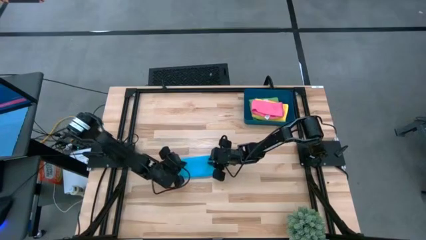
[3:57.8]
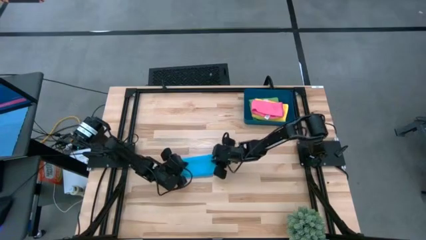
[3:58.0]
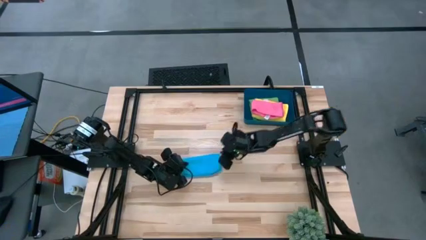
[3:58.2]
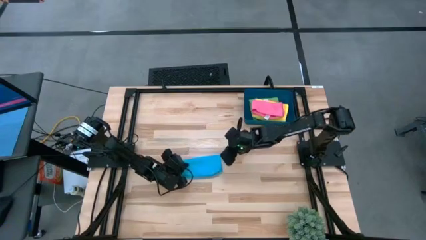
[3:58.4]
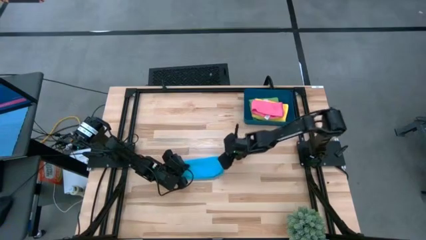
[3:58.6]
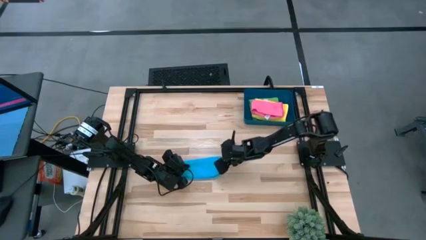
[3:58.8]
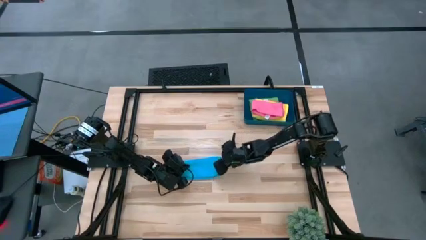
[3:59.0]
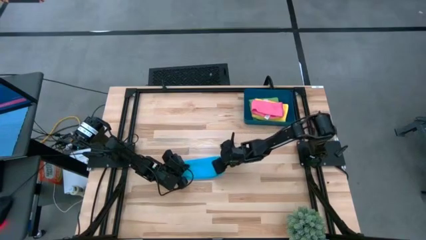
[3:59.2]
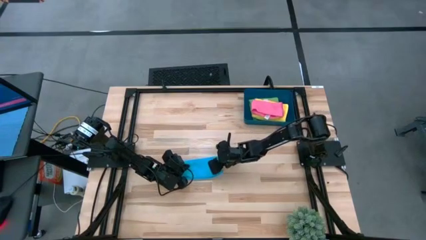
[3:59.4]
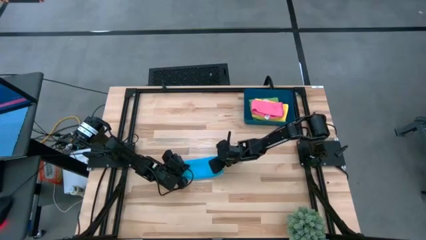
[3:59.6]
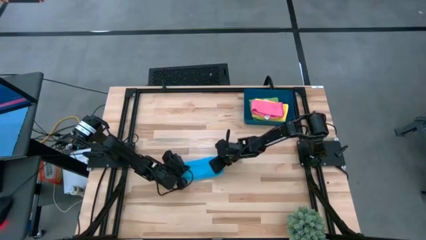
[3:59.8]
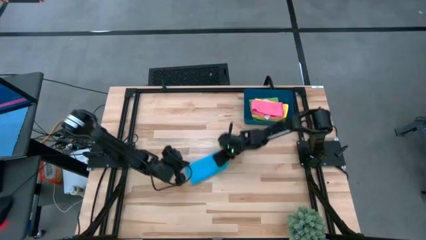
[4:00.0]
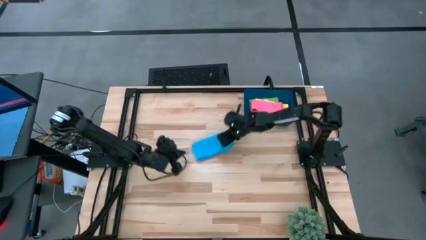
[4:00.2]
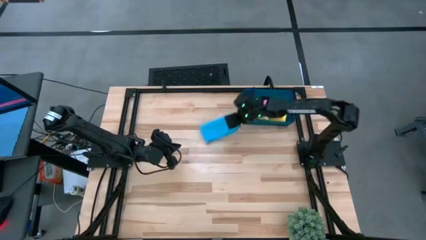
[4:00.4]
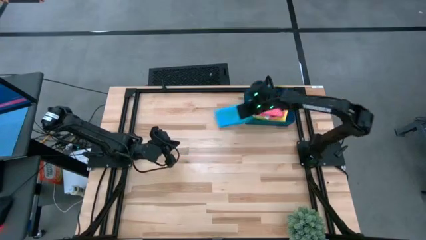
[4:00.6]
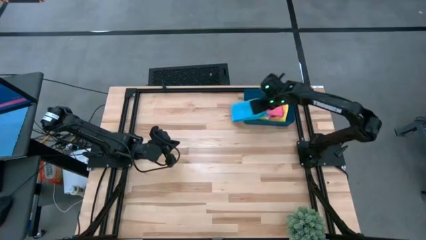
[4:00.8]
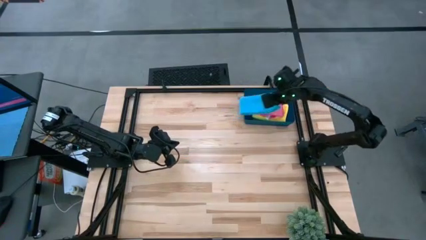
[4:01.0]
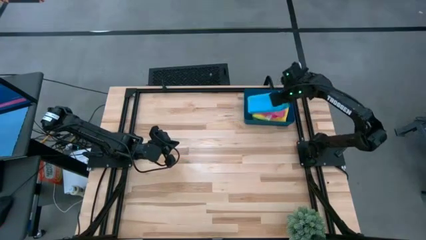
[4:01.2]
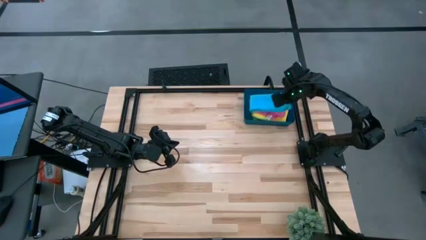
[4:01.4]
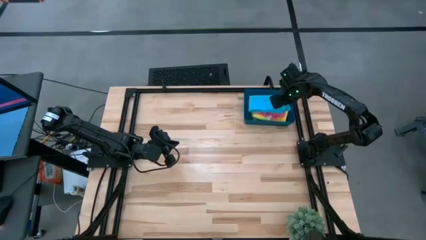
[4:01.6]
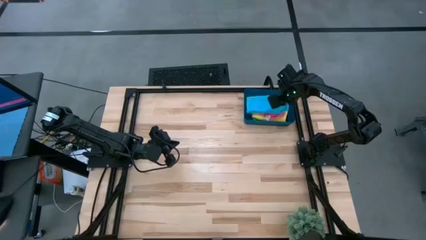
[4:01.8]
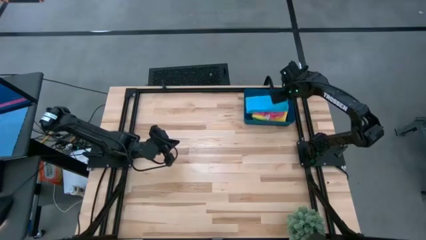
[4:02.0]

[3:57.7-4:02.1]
Task: Fold microfiber towels
Put the light blue microfiber towel into the bin

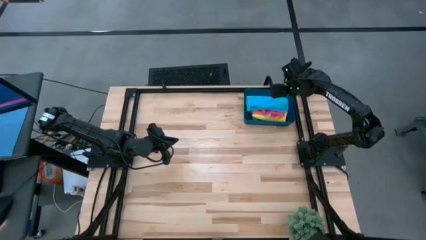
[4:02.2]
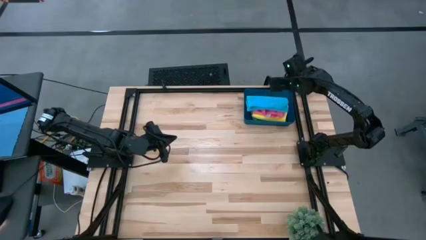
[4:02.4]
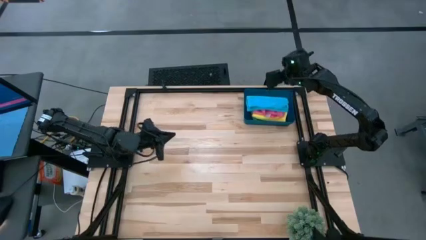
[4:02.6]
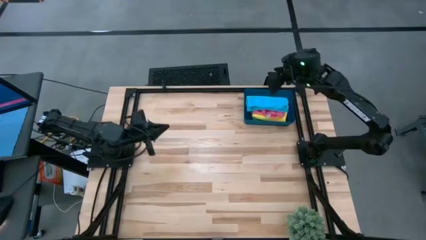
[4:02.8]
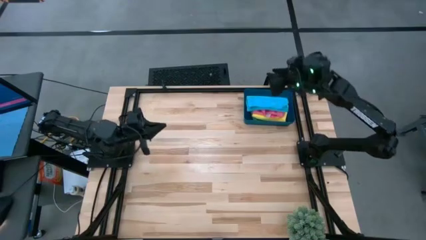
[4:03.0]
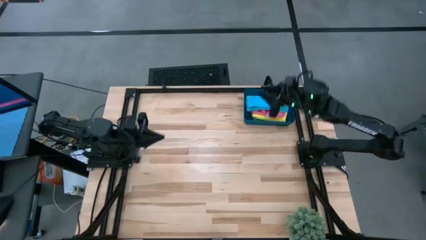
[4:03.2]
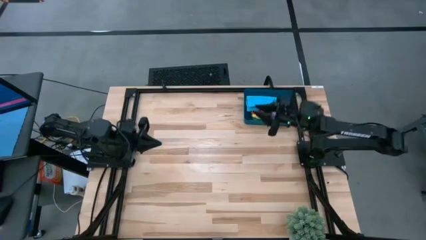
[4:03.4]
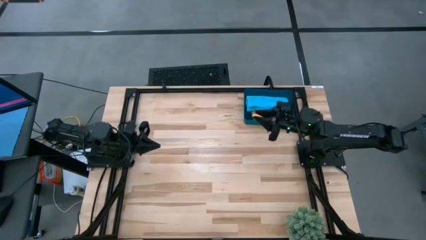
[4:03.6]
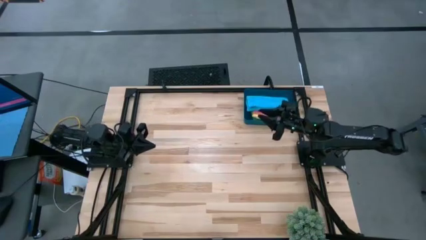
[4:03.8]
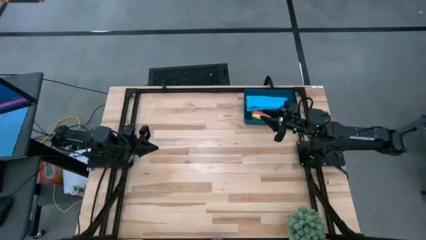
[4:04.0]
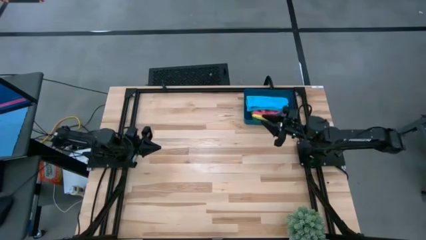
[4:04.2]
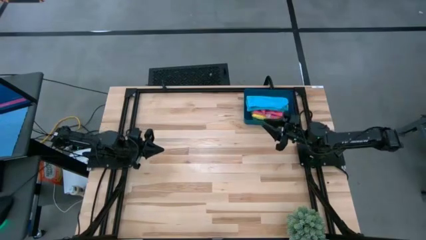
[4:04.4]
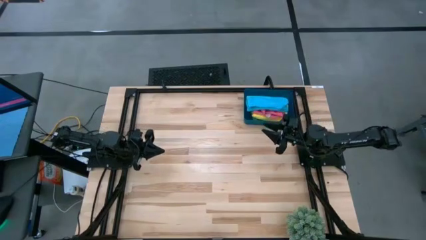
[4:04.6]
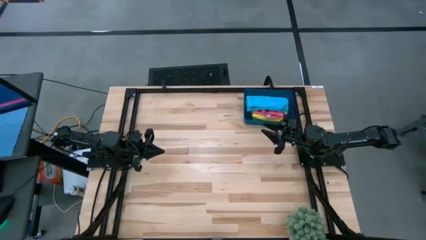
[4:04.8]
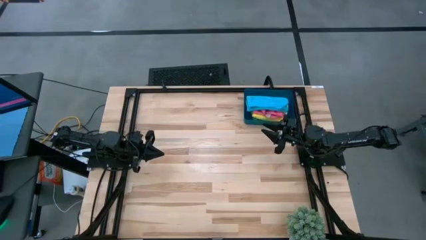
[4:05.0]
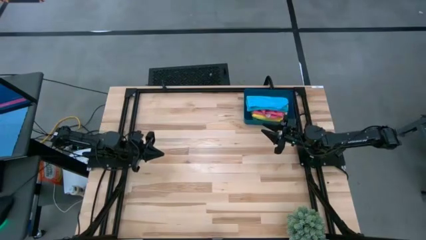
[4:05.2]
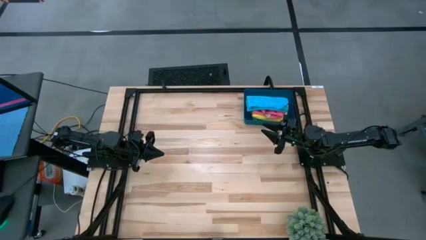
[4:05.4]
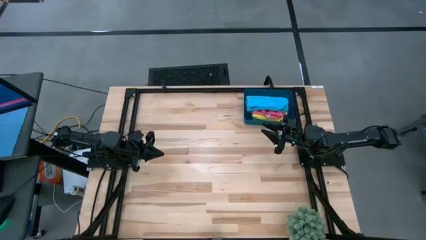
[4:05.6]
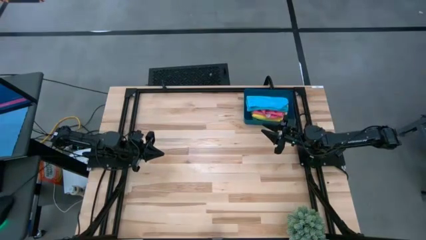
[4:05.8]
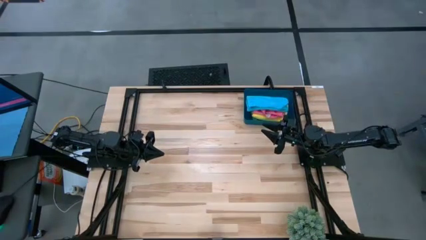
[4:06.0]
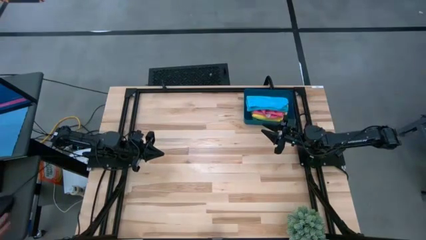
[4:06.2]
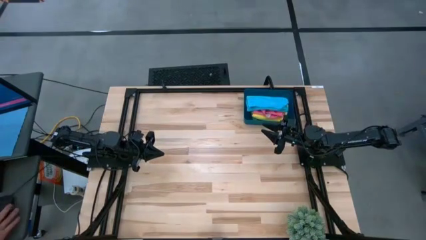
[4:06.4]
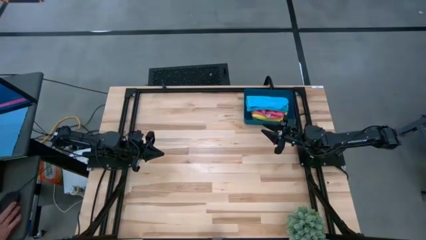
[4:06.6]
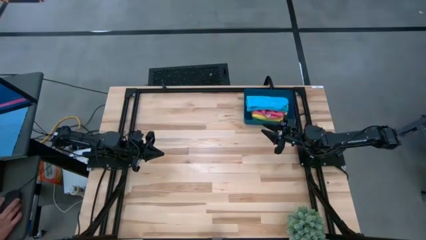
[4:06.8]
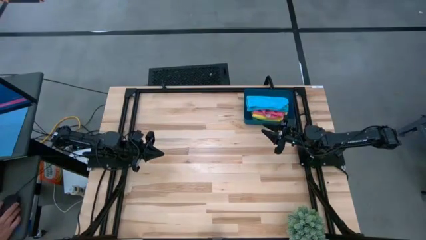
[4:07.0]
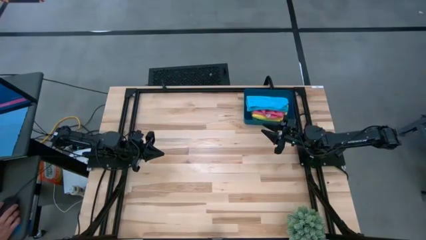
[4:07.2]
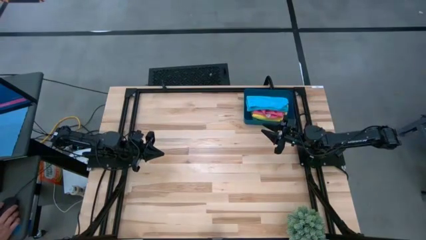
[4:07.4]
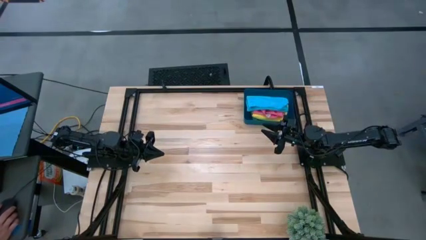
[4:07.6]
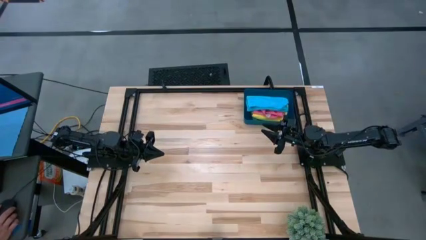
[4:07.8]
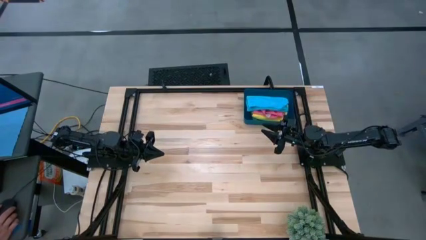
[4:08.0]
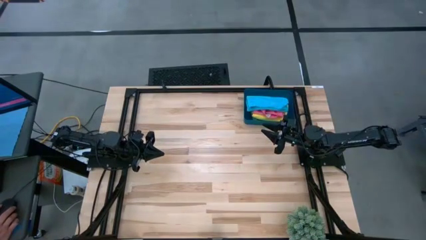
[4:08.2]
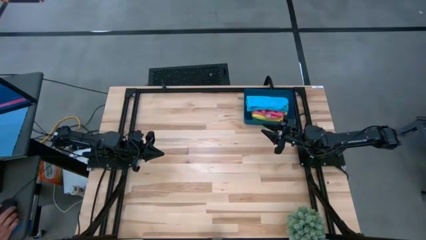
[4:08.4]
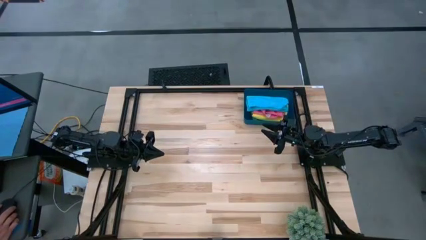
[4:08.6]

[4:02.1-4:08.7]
Return to Home Position

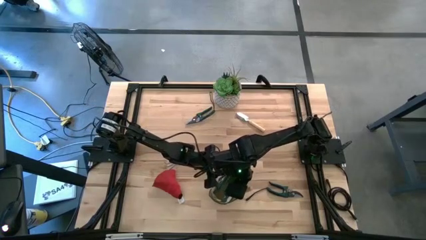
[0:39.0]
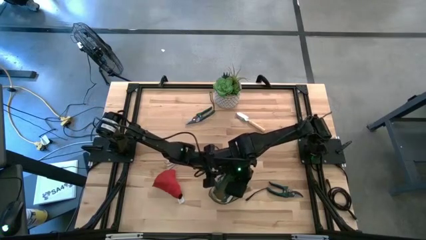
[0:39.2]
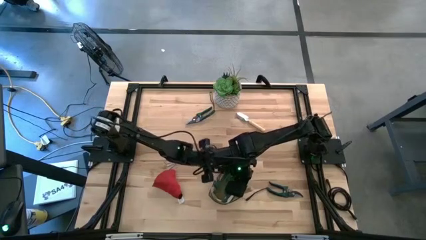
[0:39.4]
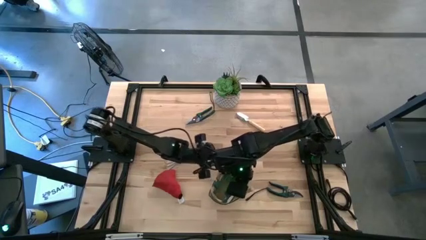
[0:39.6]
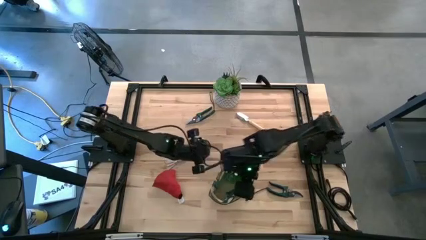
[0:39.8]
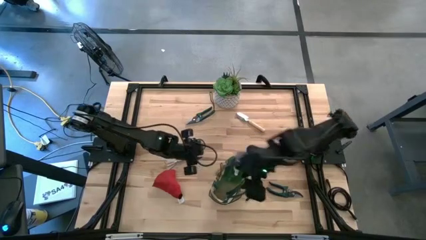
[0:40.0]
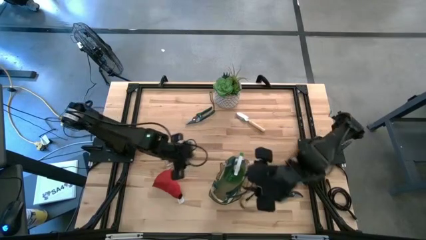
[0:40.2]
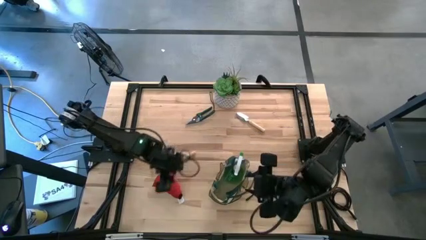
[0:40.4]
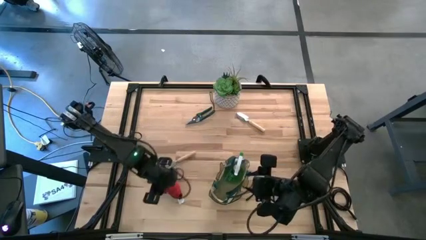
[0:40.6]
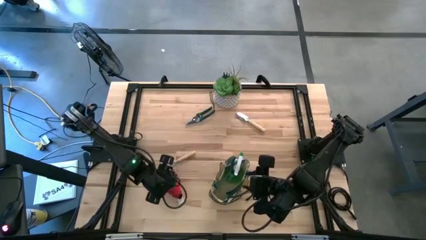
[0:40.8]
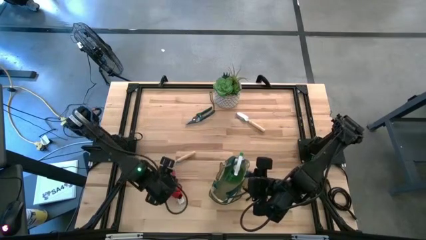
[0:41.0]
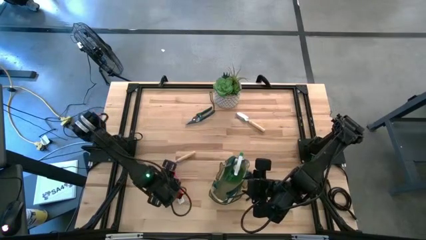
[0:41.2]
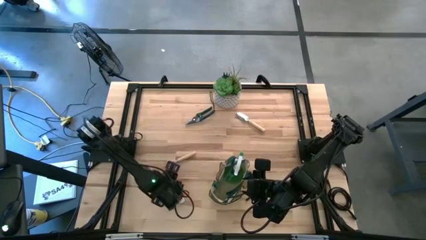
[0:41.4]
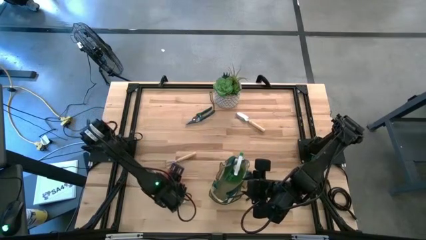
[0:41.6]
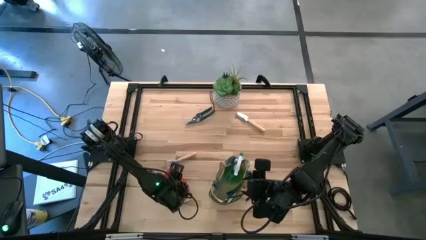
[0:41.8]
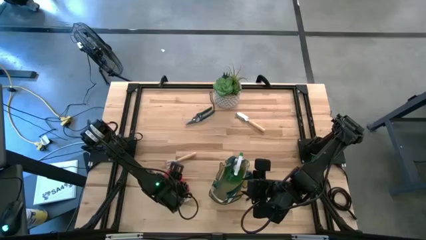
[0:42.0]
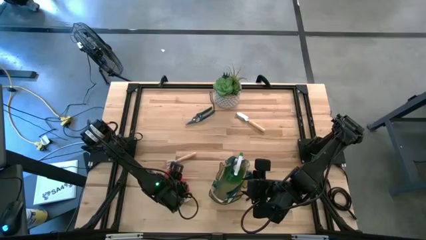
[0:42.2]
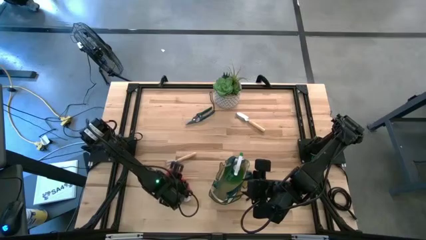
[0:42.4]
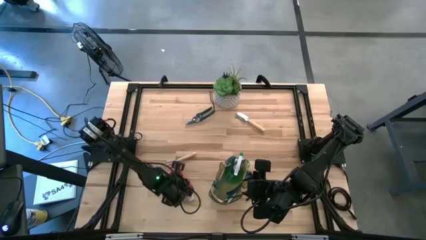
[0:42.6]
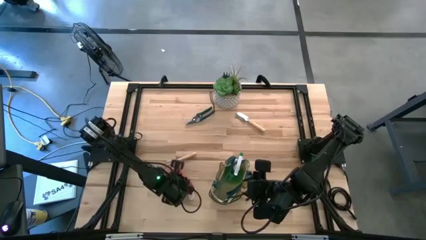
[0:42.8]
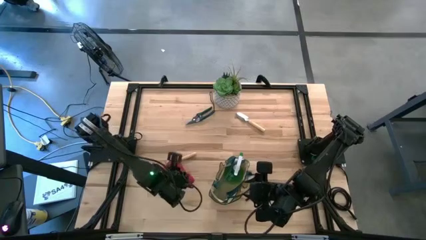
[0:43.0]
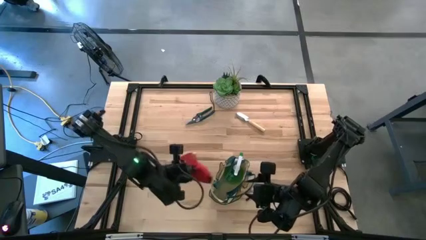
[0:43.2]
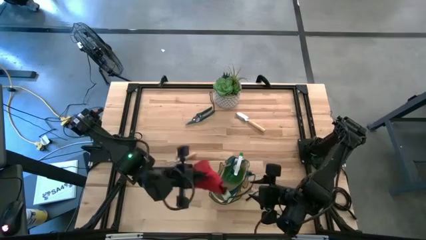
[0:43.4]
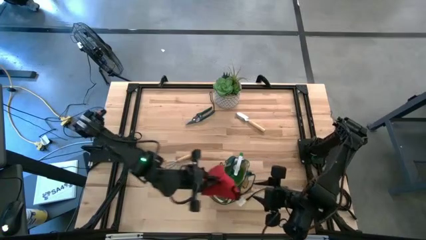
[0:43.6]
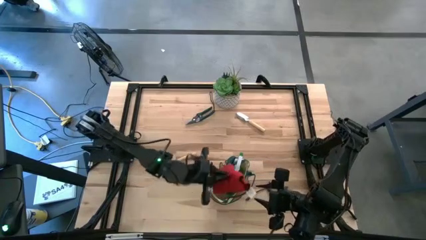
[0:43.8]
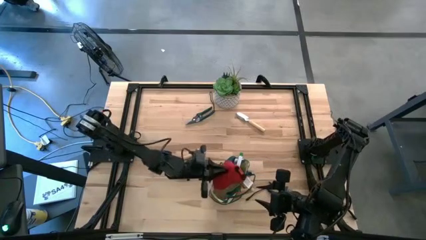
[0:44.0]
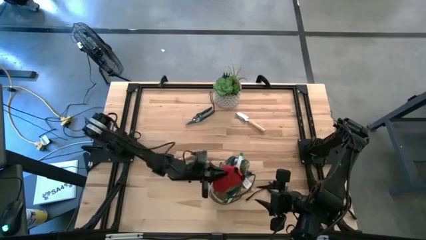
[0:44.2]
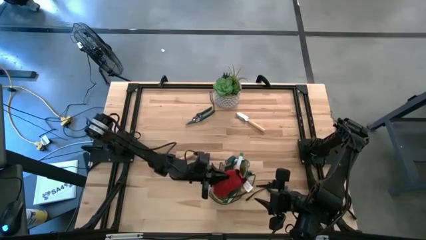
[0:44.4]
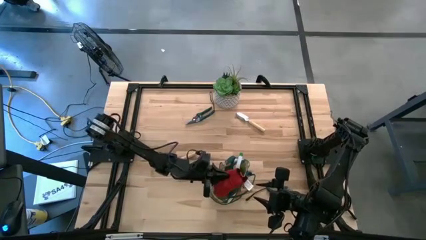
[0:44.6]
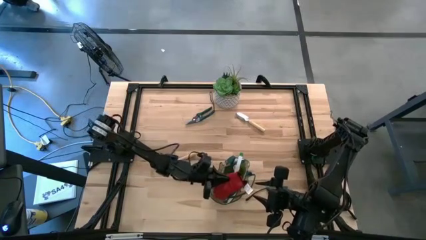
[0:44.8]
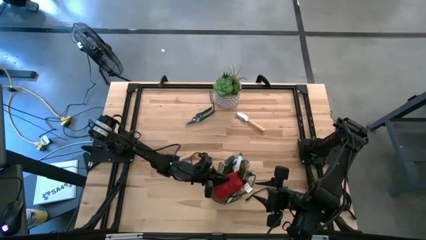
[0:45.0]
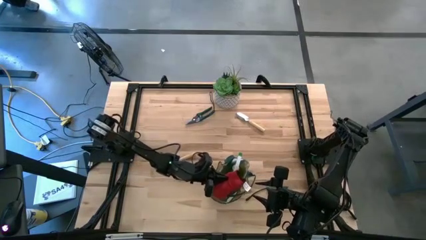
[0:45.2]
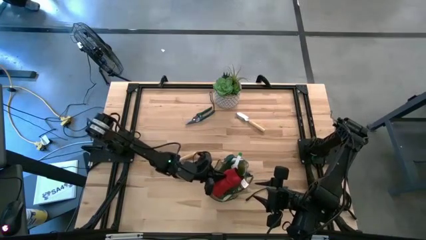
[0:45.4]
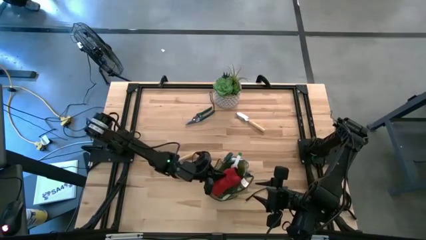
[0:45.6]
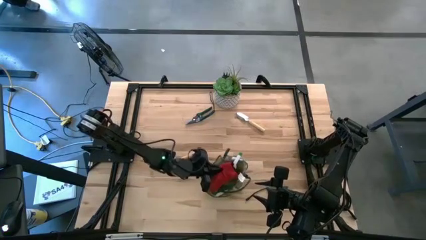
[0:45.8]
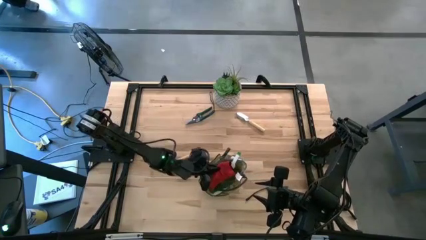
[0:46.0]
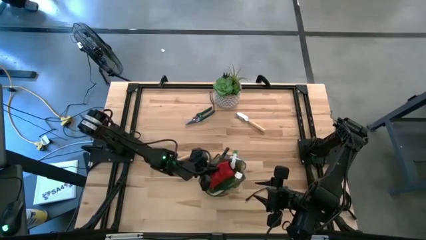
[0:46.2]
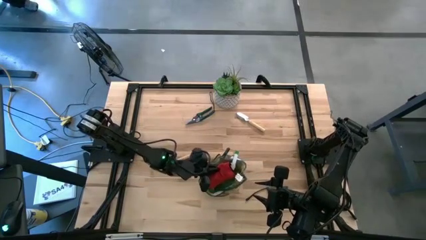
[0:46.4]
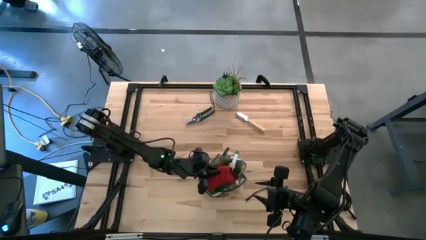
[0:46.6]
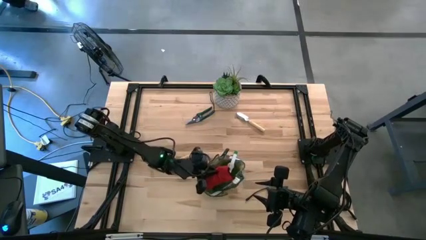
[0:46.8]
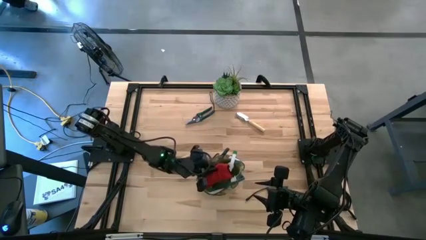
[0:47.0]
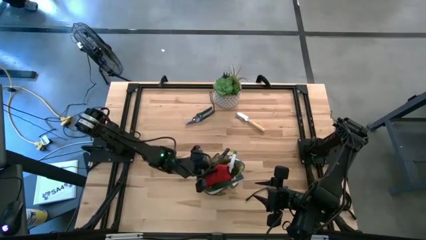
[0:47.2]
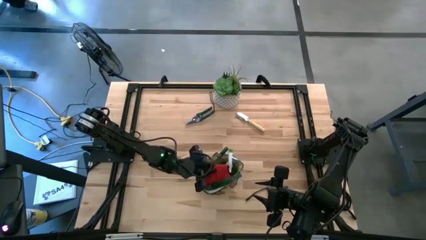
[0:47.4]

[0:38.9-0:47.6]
Task: Pick & Place Garden tools in Gardening bag
Put the red gloves into the green gardening bag
